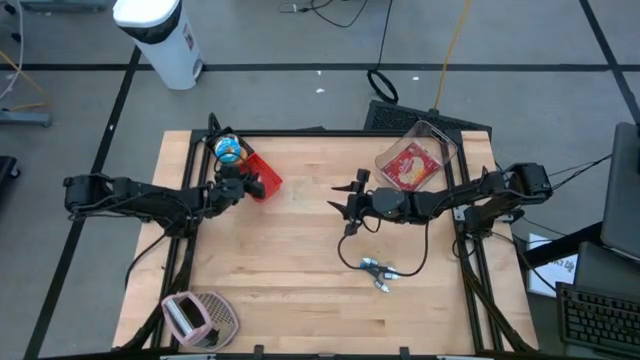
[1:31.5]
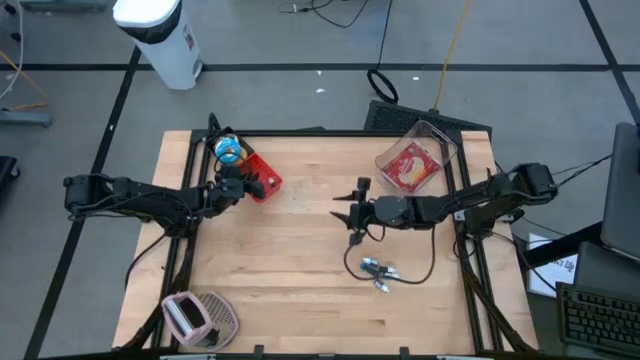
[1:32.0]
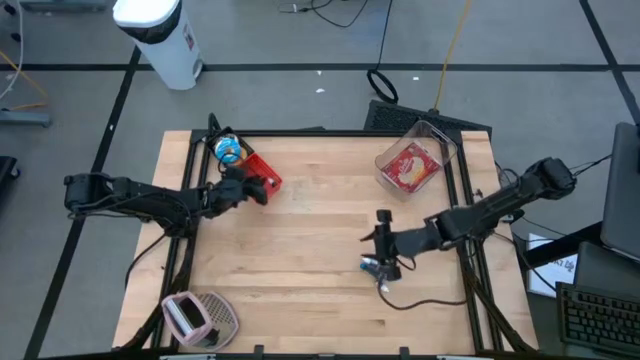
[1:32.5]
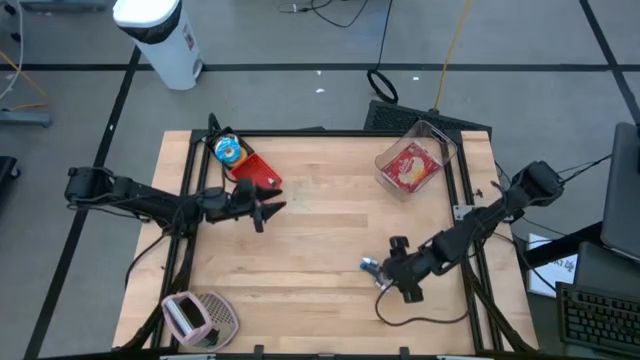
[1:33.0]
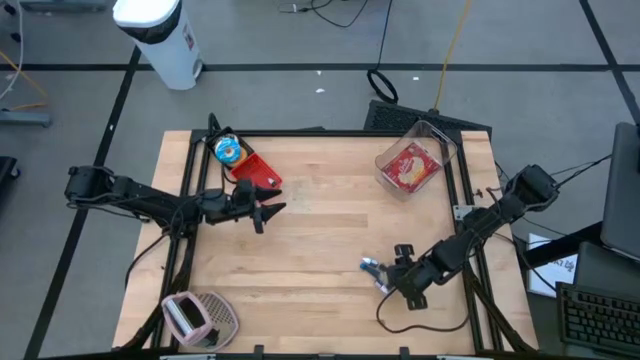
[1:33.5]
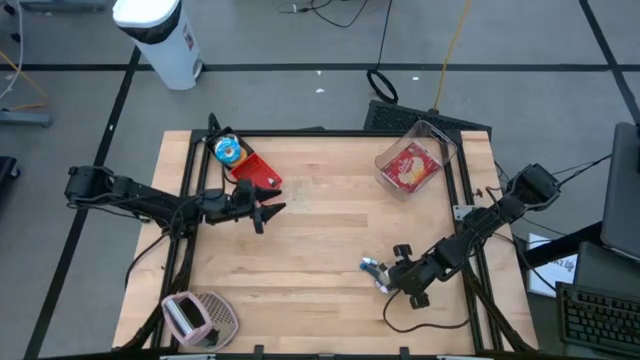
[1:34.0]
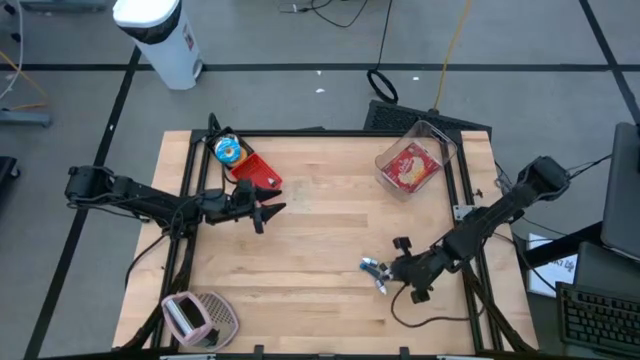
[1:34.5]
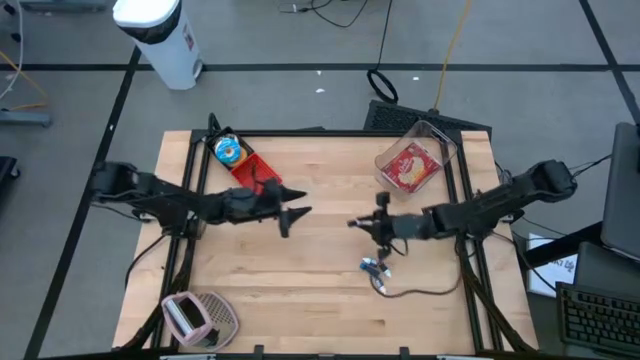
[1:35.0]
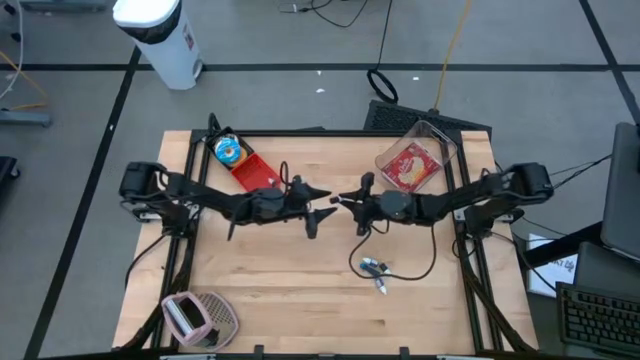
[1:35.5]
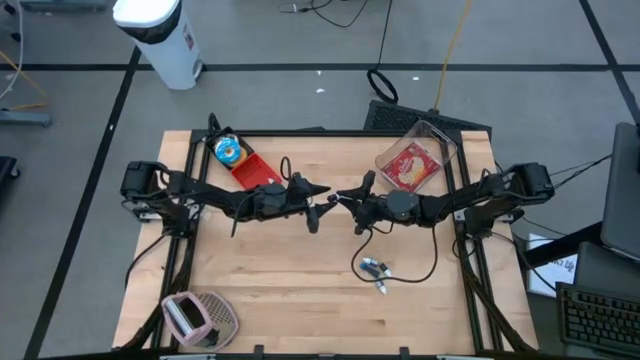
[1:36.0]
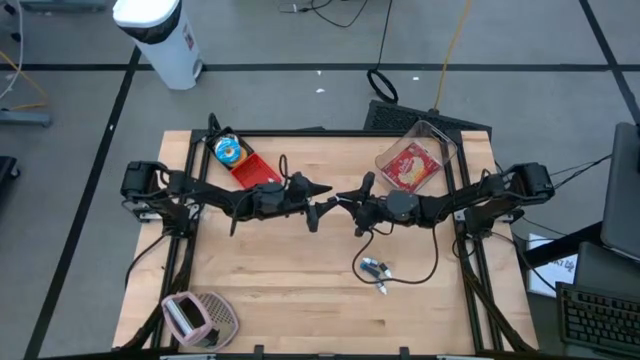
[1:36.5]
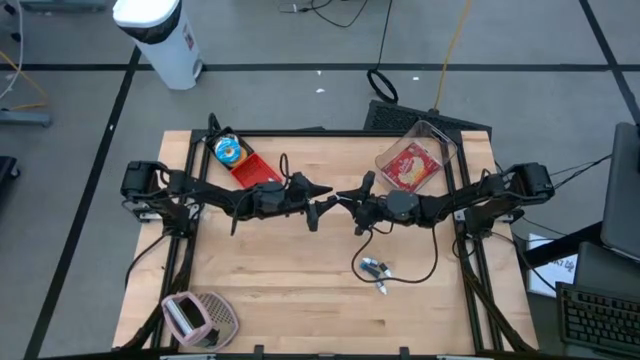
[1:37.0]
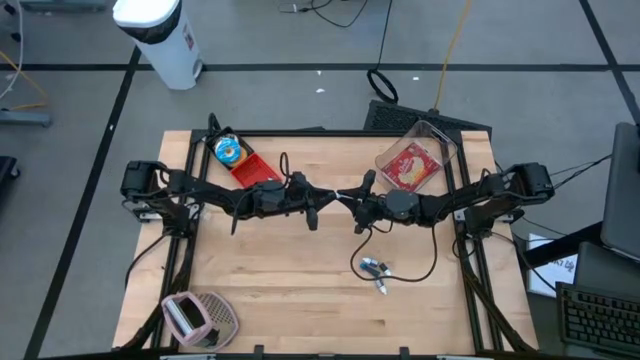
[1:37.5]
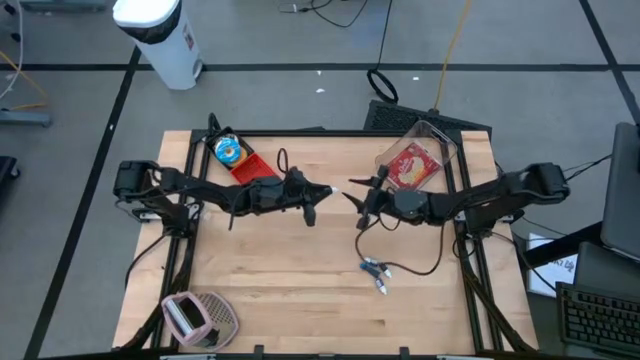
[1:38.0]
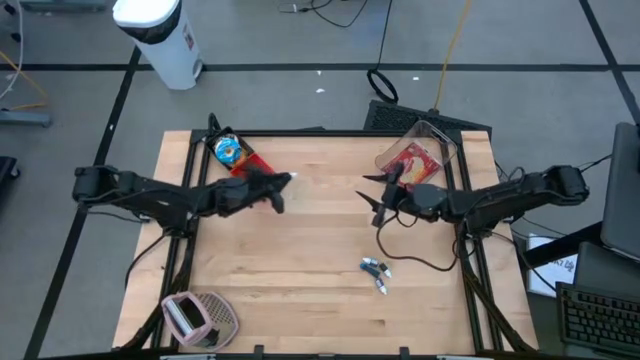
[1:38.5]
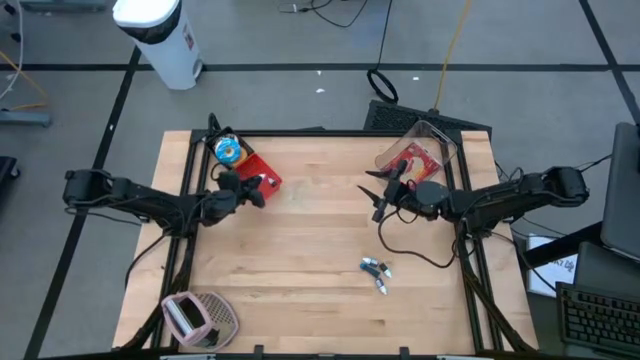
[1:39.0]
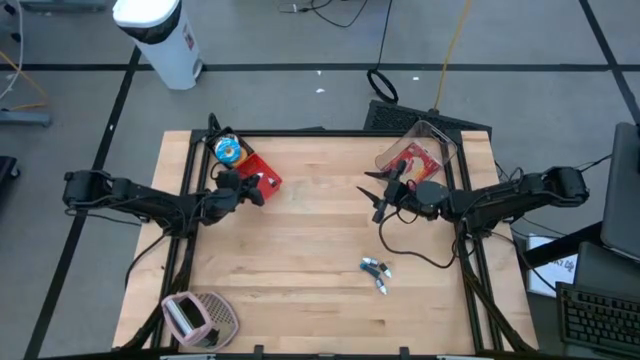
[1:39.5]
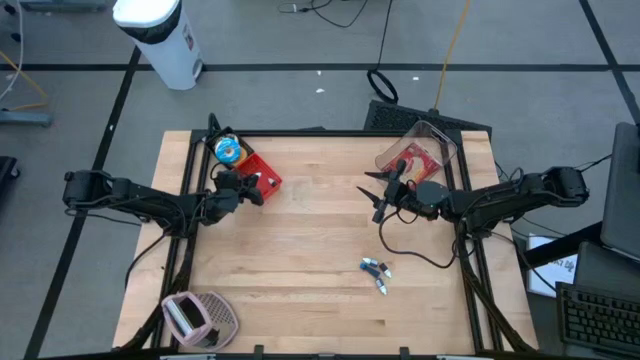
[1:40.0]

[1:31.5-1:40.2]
Put the green food coloring bottle into the red bin

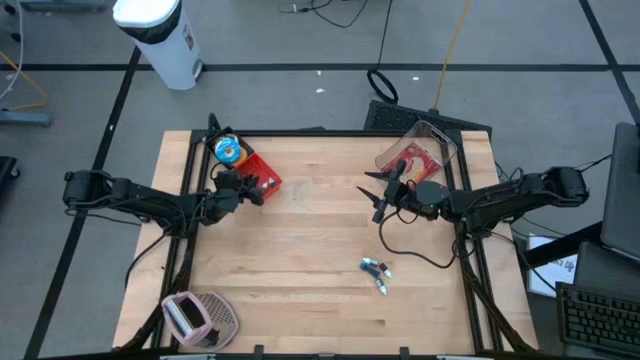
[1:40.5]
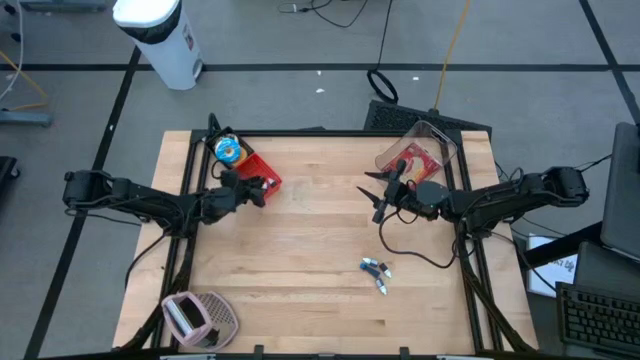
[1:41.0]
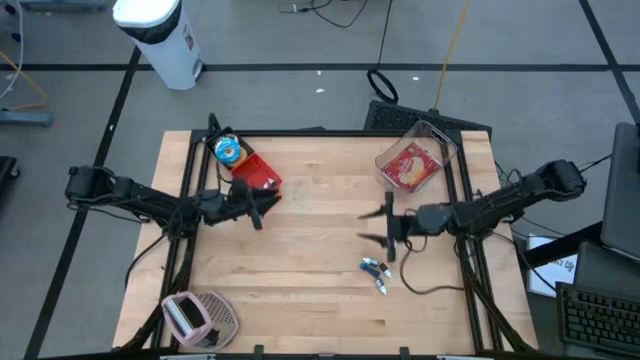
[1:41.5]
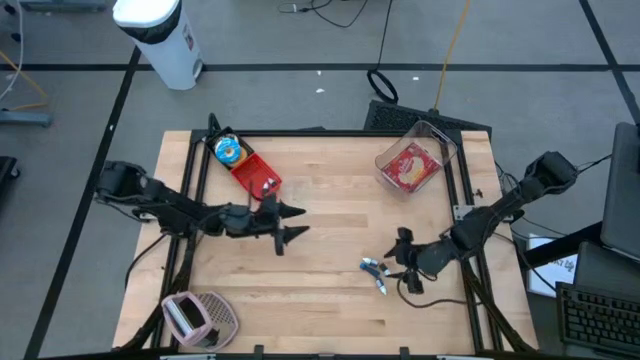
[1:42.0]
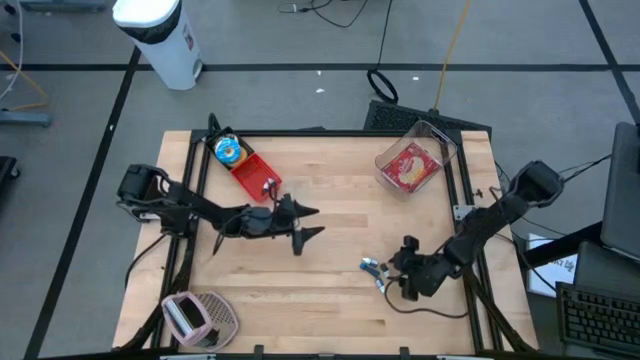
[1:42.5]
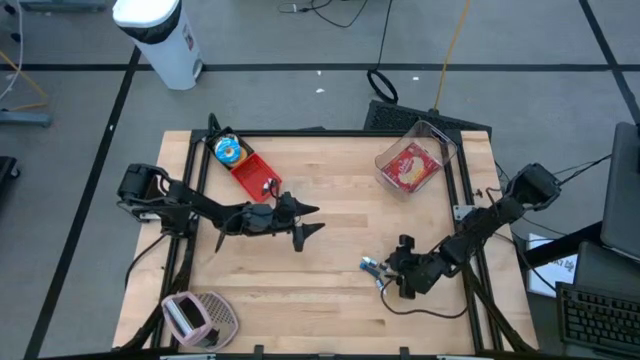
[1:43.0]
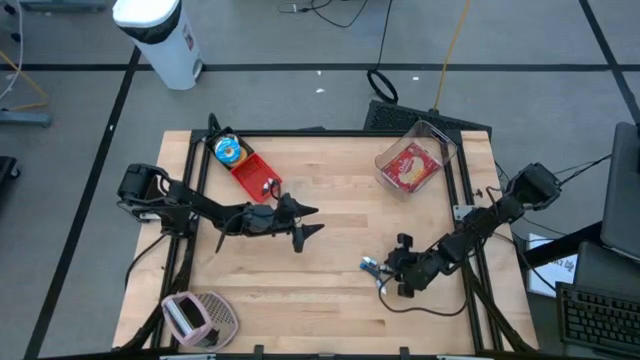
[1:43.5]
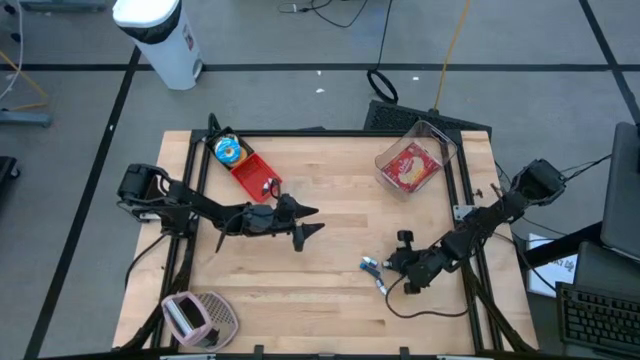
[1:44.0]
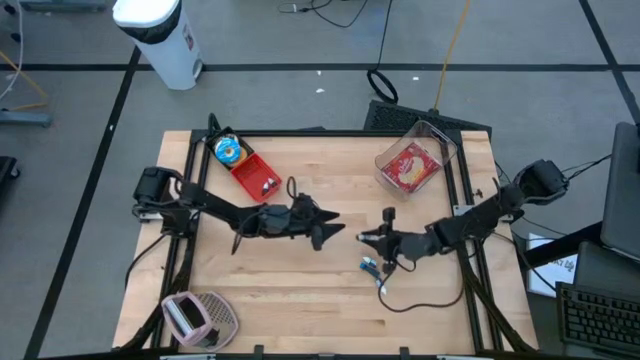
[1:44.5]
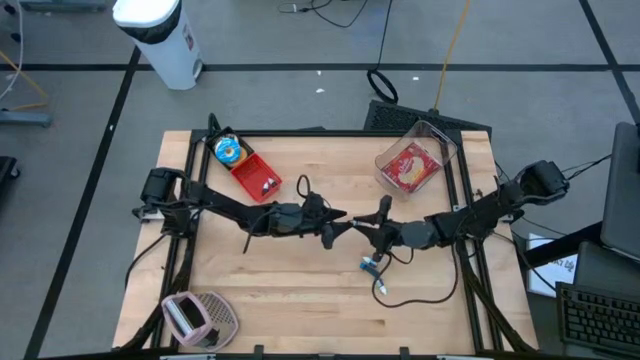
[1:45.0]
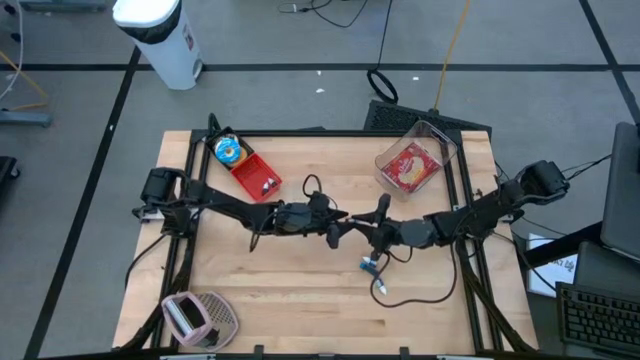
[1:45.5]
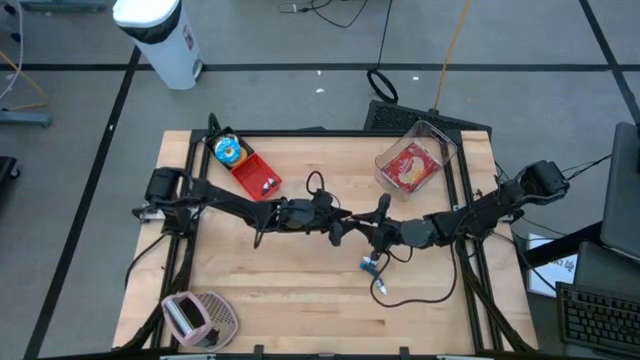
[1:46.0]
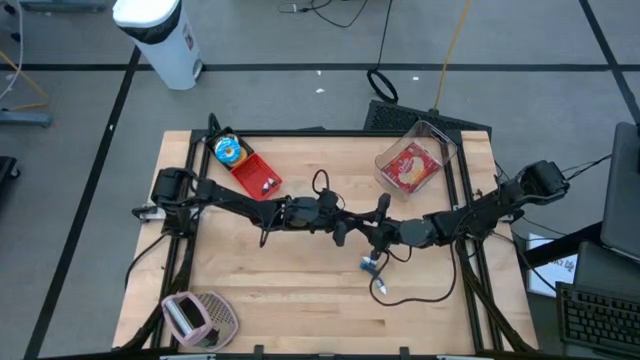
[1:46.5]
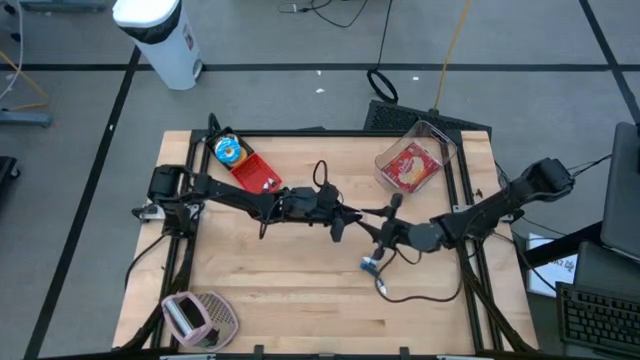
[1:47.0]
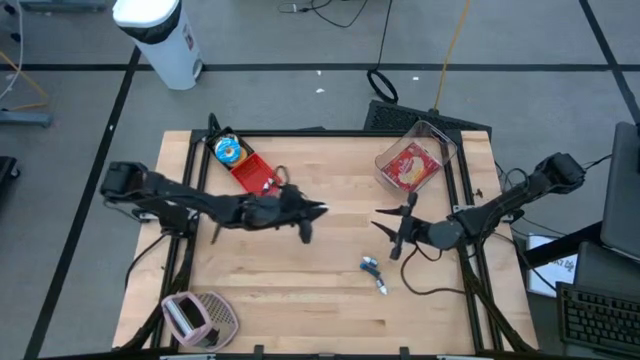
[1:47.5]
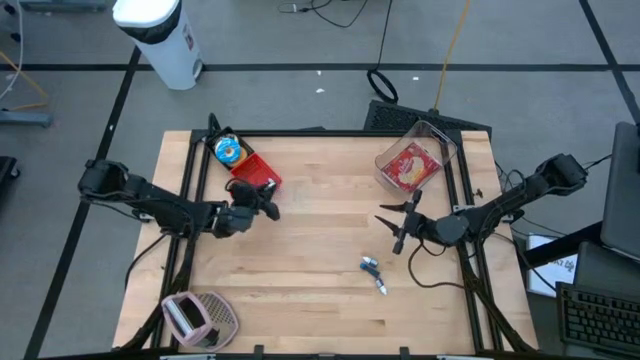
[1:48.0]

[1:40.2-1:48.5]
Put the brown food coloring bottle into the red bin
